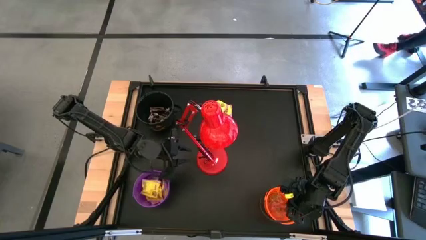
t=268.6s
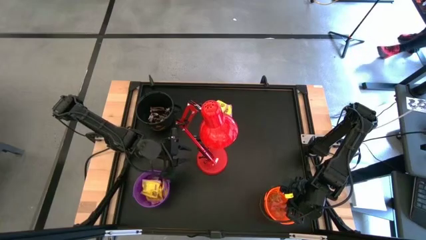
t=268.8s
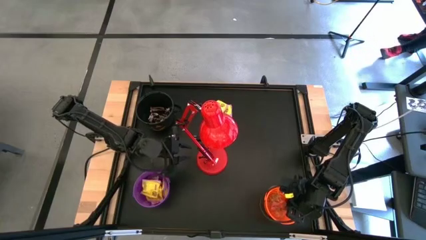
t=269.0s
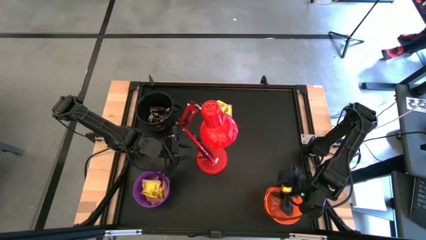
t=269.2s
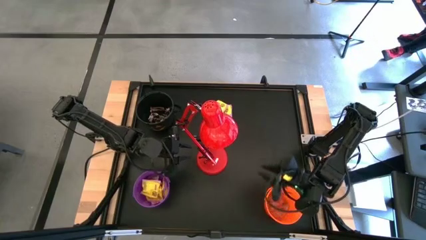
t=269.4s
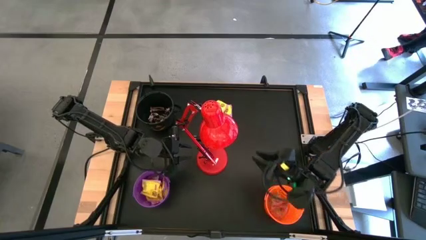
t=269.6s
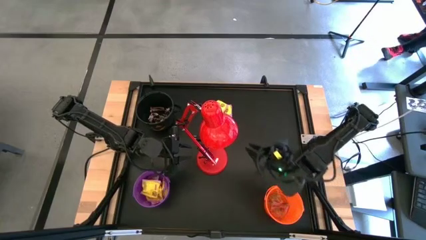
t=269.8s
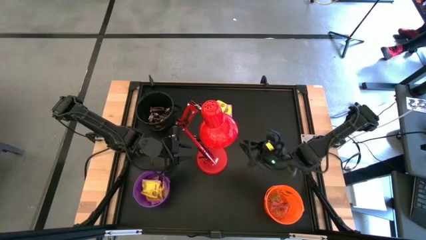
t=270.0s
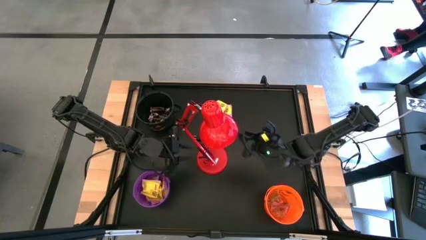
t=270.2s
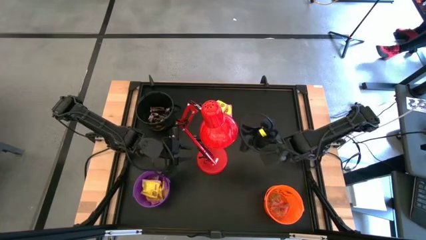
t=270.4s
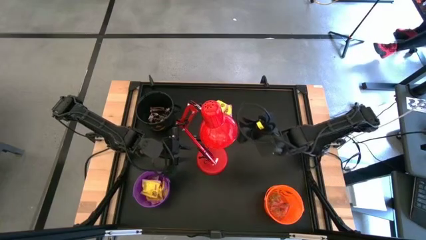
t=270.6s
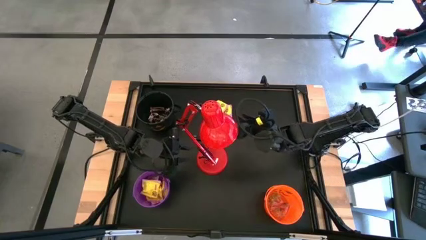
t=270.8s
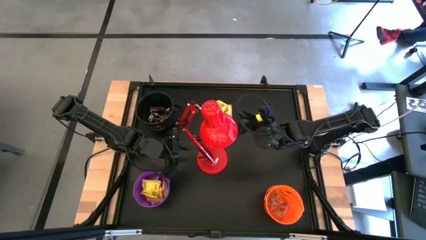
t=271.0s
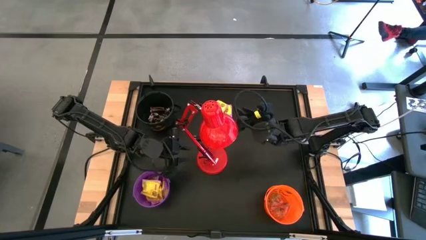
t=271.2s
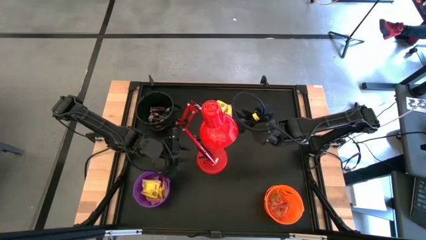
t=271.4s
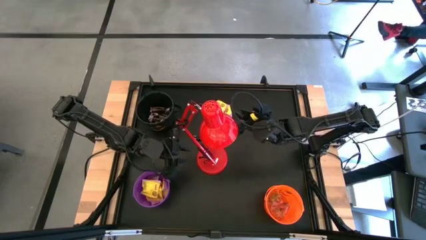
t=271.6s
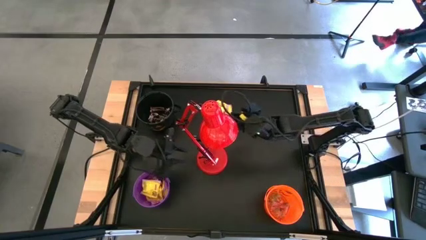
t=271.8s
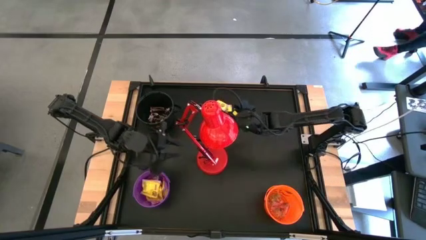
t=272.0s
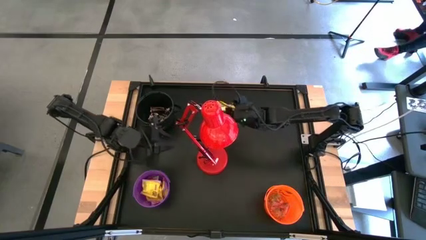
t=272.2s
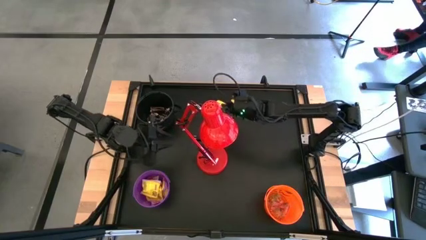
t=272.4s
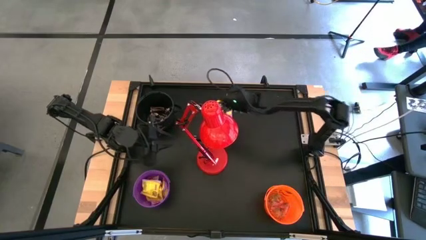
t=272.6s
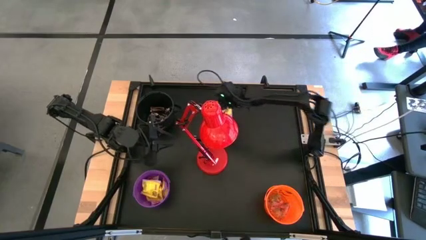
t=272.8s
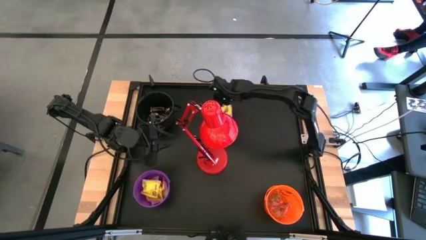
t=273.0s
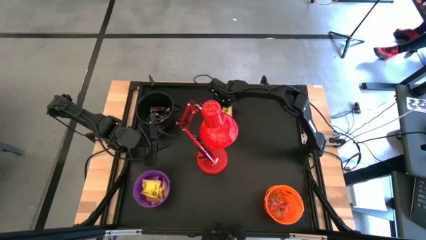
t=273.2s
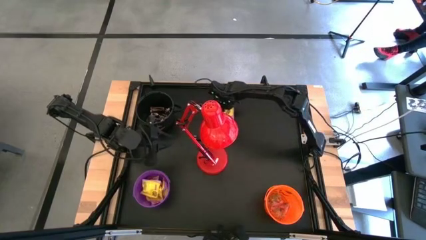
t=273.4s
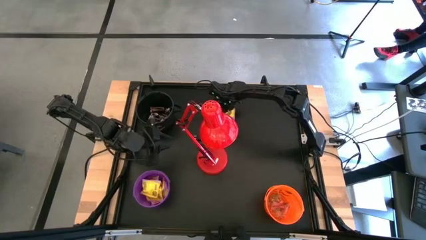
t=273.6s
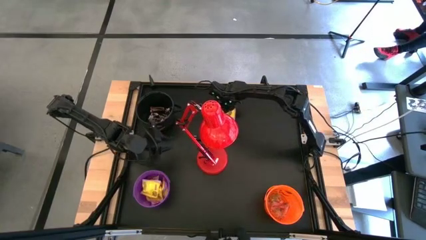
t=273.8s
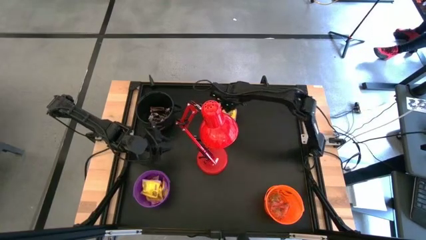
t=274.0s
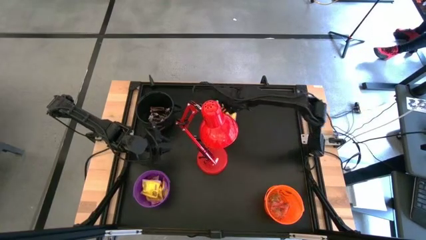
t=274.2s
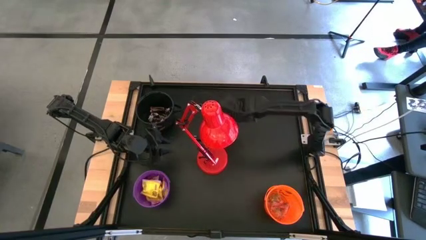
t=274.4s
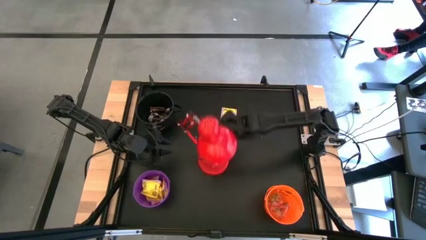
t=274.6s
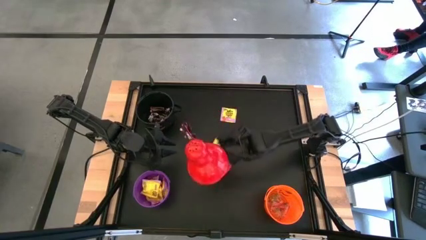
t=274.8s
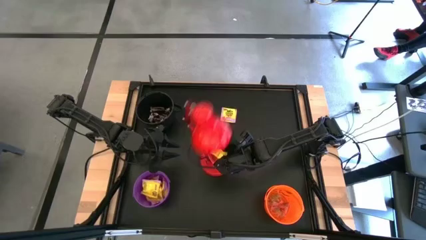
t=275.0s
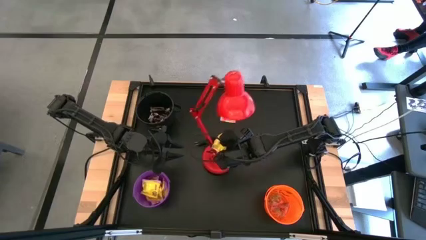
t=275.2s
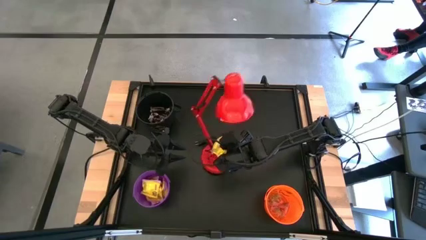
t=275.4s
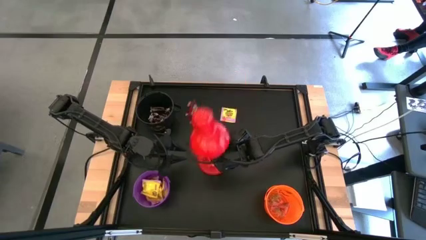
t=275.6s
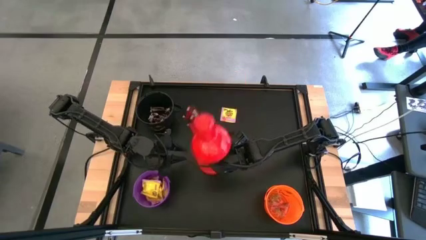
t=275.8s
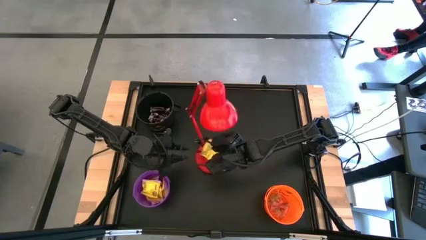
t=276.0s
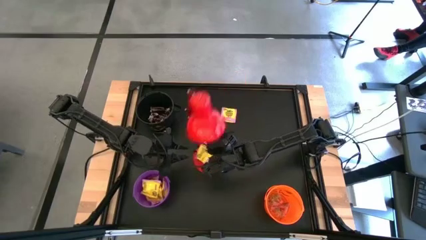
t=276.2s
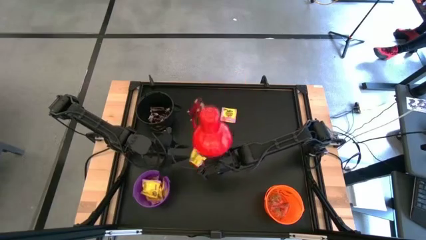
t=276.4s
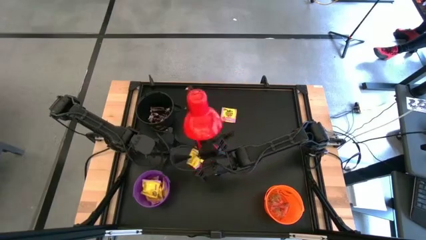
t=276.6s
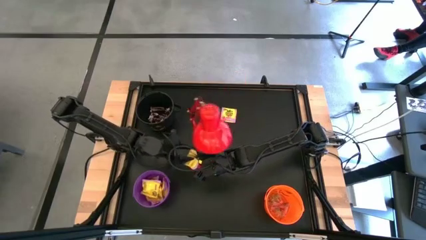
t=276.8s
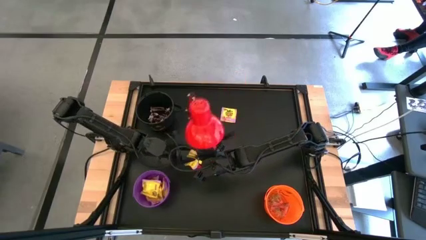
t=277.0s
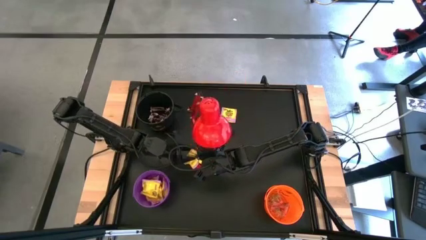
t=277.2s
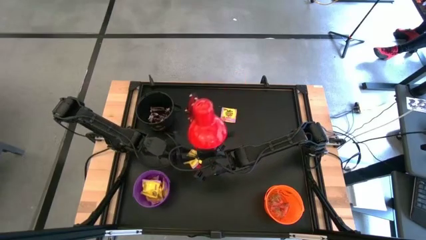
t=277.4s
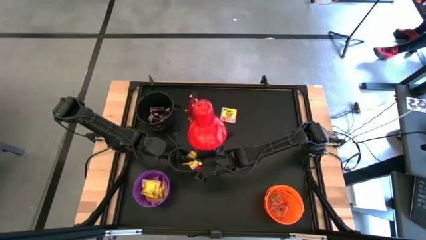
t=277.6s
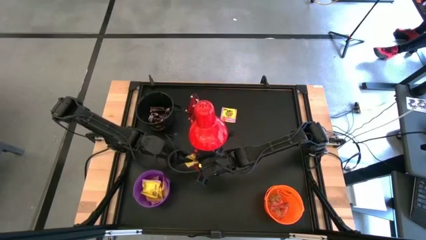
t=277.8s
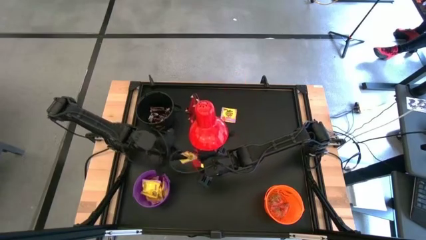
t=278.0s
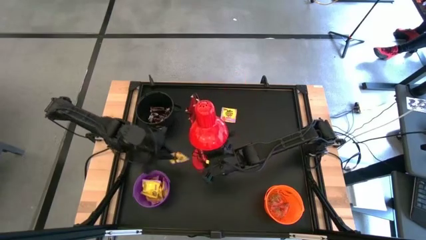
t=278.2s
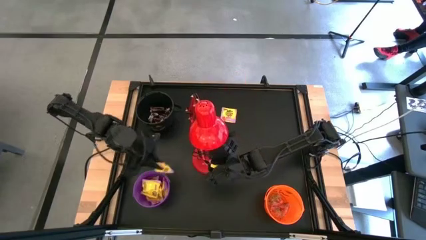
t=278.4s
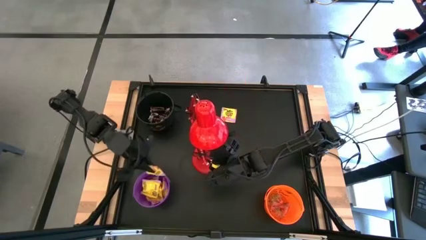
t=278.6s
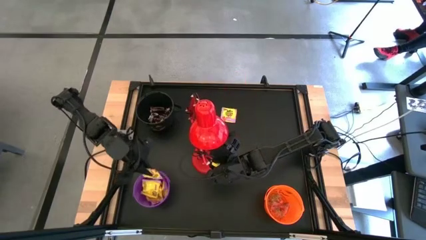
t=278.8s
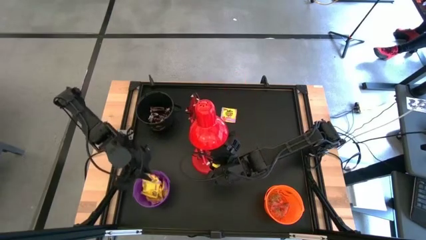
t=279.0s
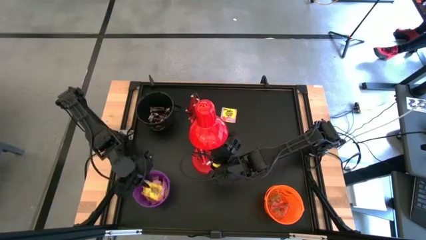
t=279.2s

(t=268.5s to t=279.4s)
Task: Organize candy in baskets
Put the yellow candy into the violet bucket
